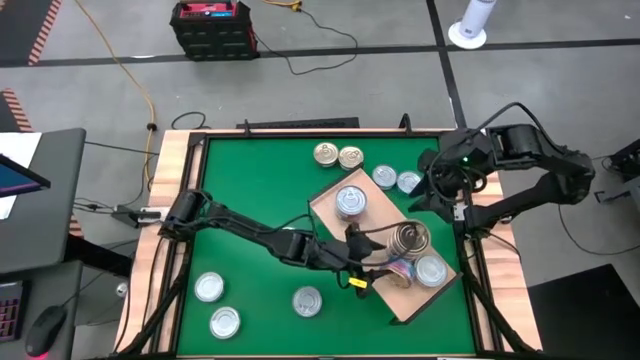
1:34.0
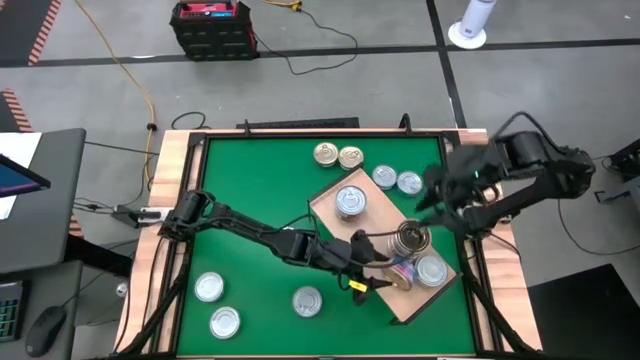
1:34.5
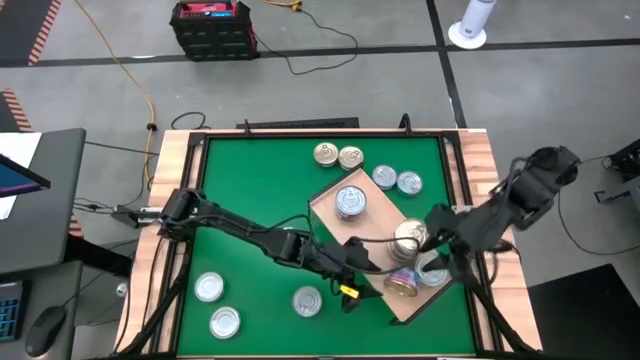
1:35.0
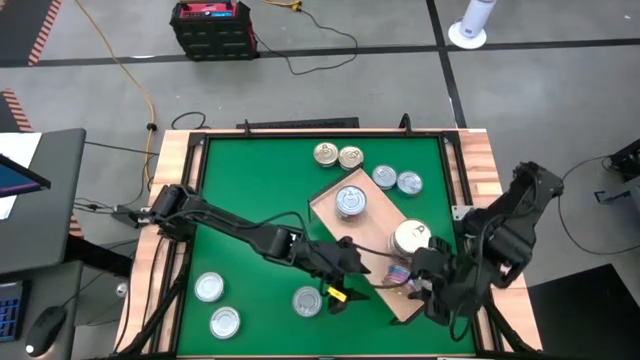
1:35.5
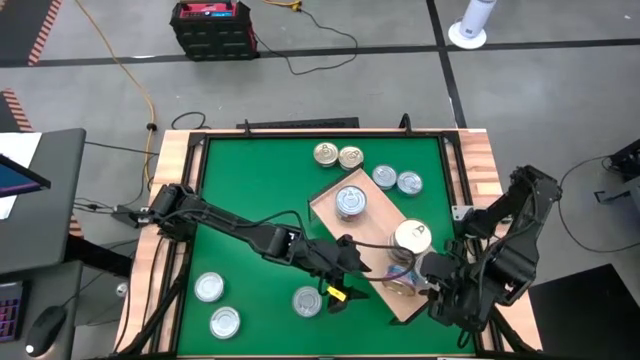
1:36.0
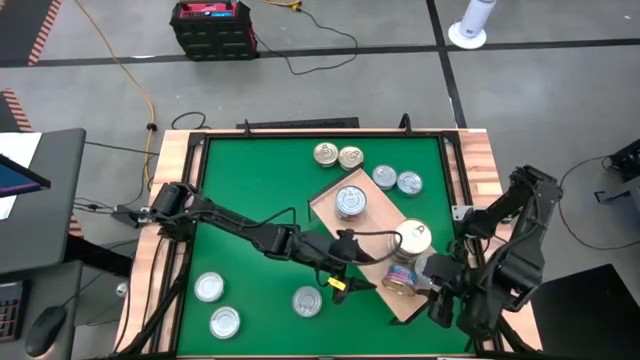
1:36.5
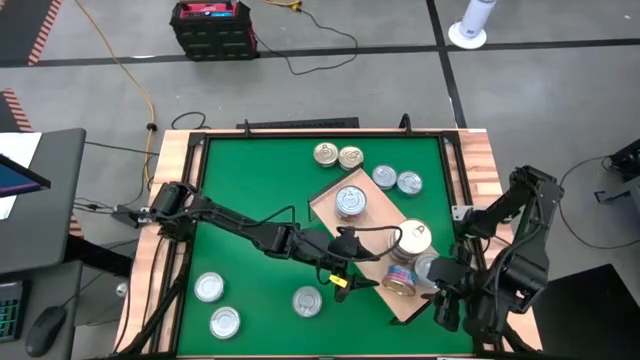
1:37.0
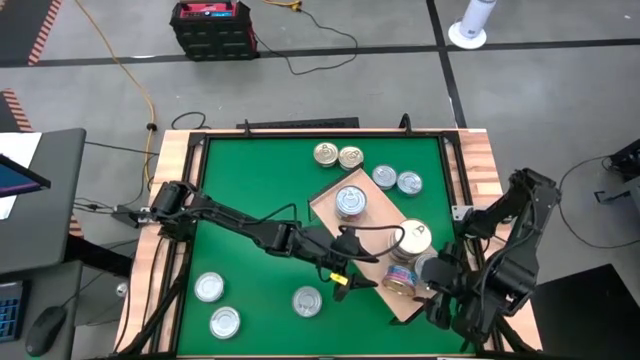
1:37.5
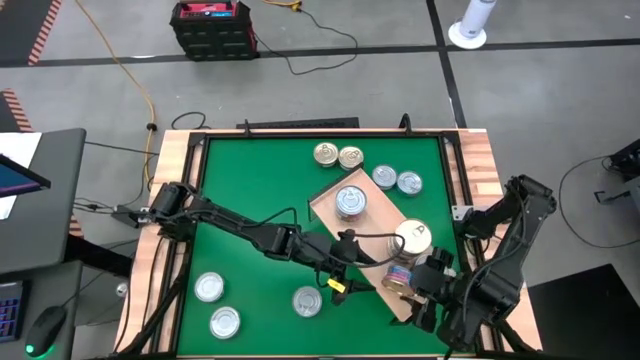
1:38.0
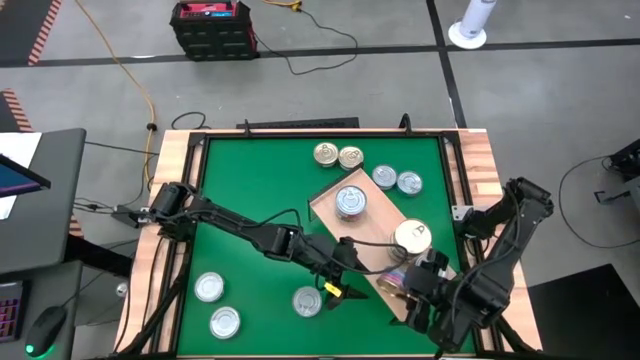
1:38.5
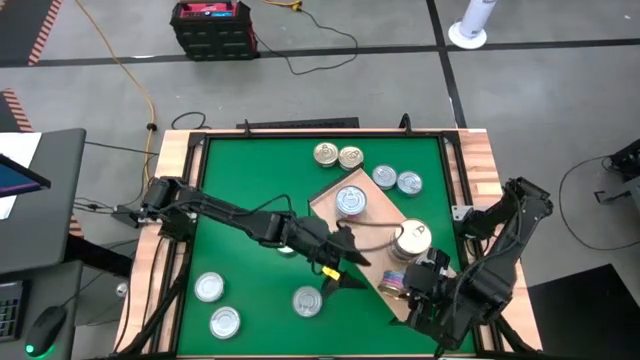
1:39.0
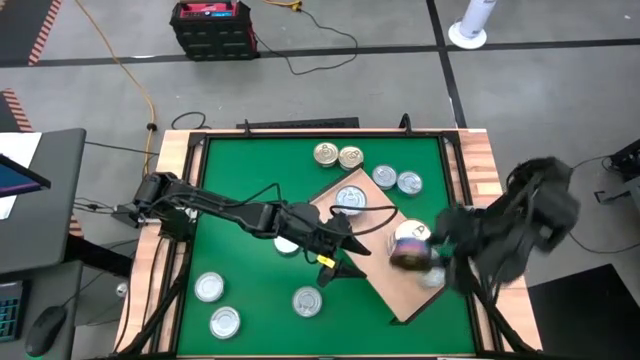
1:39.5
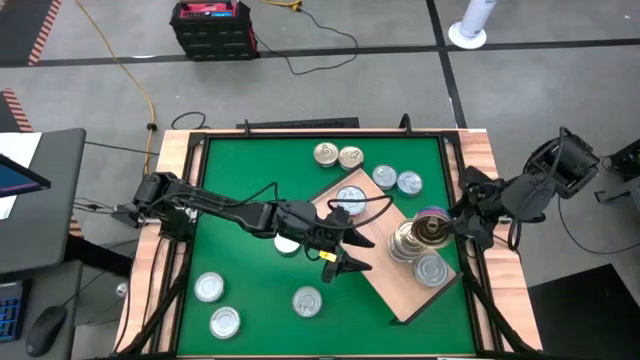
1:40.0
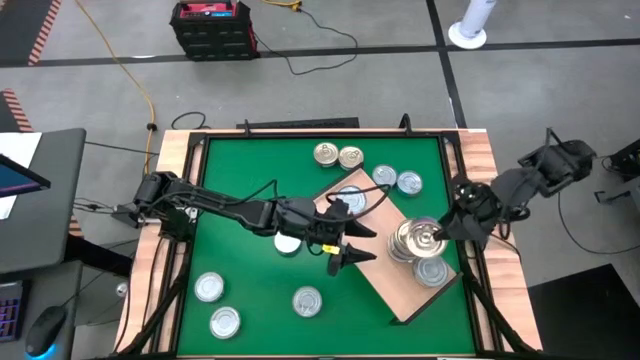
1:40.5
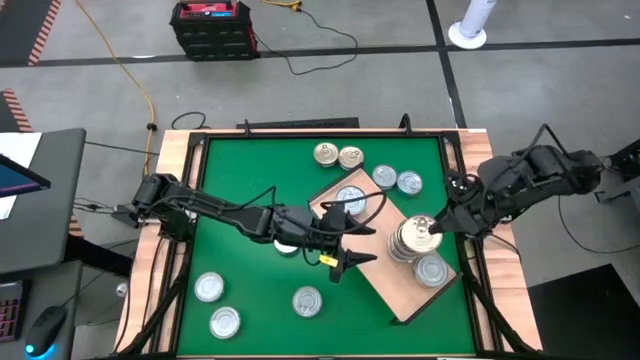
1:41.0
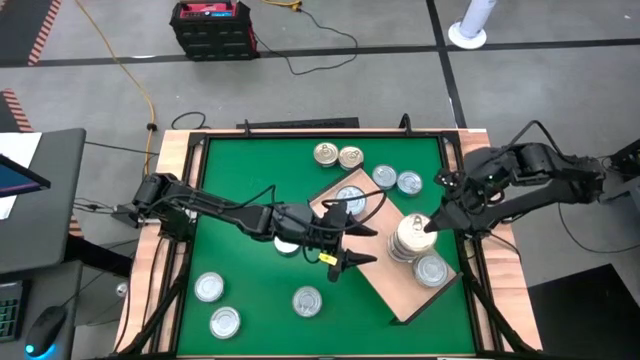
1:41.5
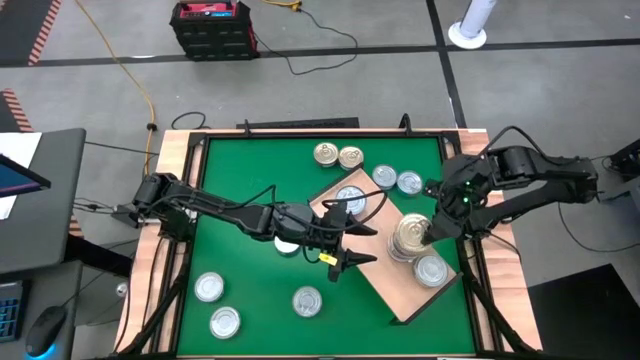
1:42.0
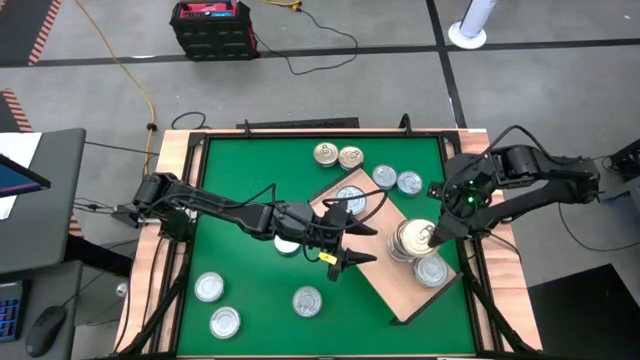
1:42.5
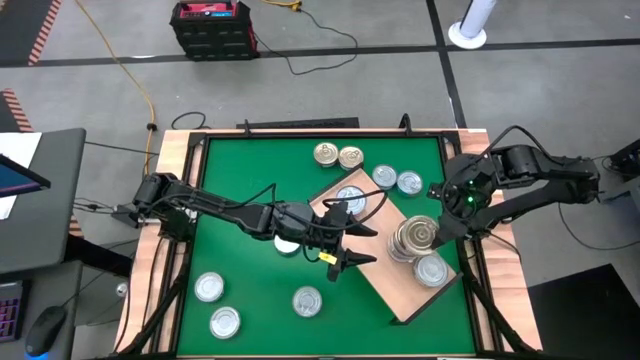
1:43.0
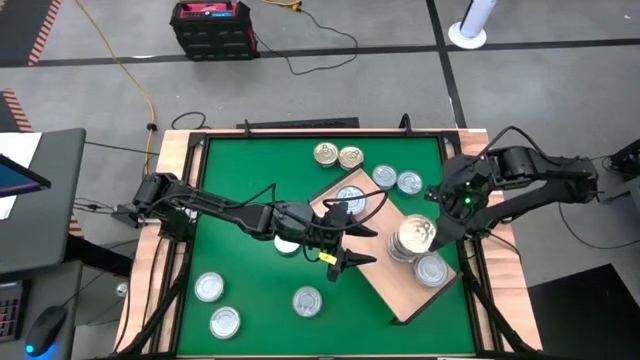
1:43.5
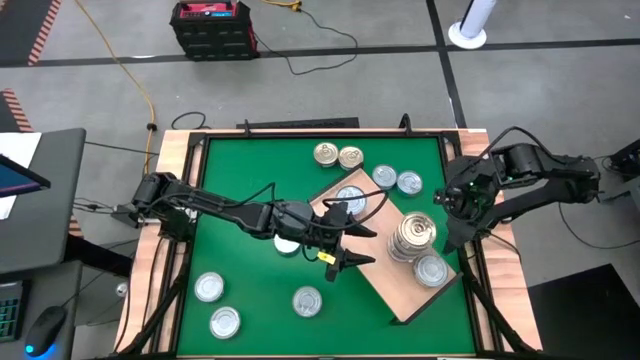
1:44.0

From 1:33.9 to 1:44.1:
Task: Stack canned seafood by type on shelf
Stack the blue and pink tuna can on top of the other blue and pink tuna cans on the shelf

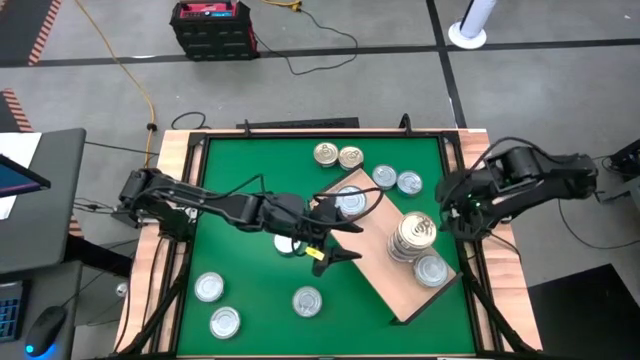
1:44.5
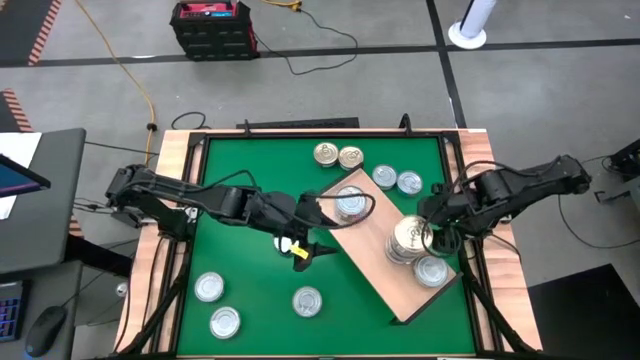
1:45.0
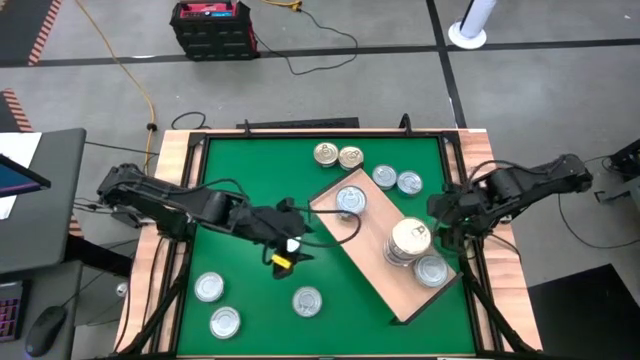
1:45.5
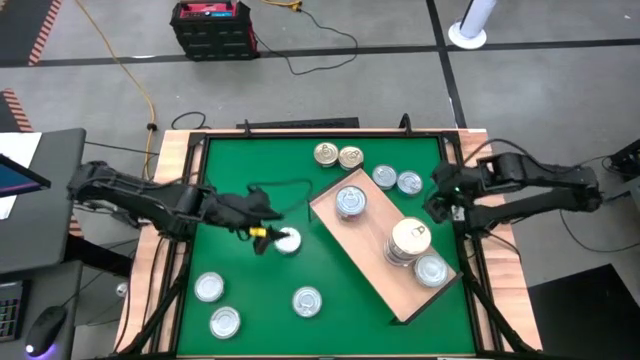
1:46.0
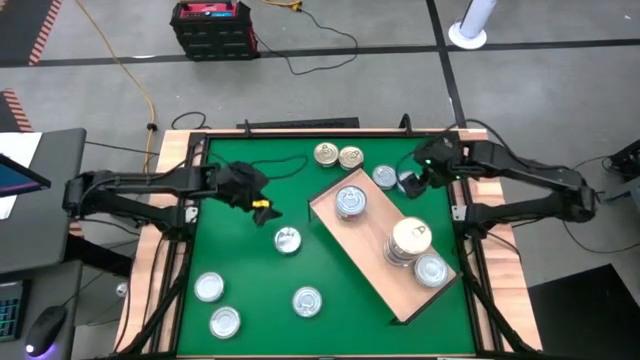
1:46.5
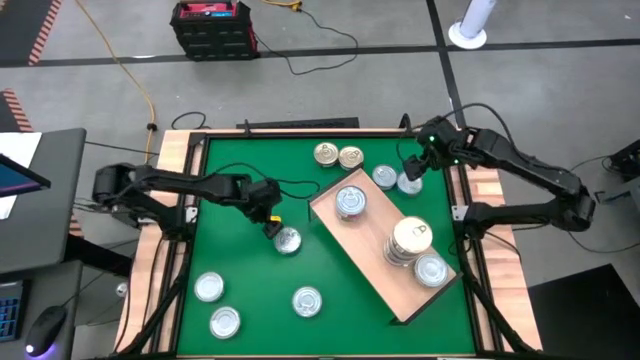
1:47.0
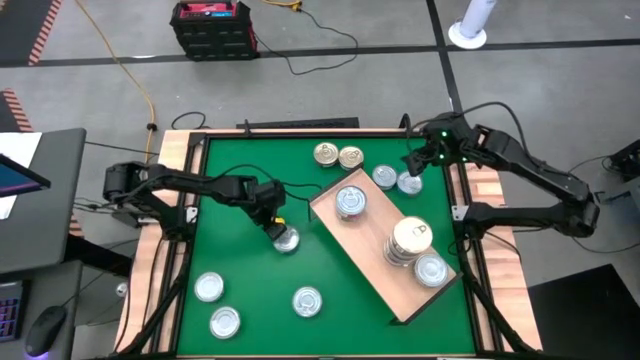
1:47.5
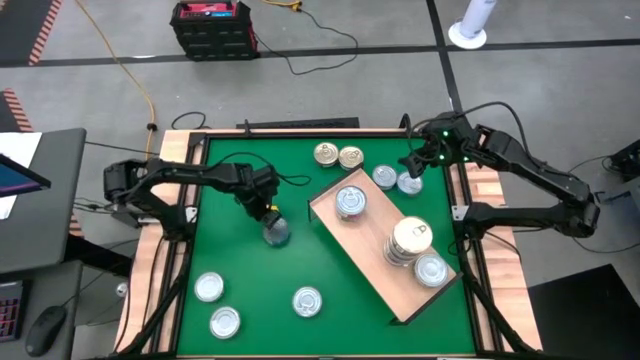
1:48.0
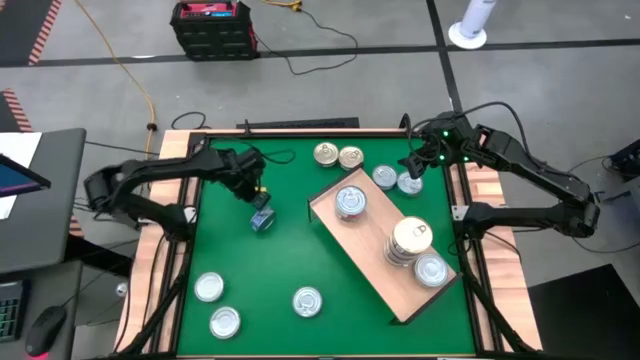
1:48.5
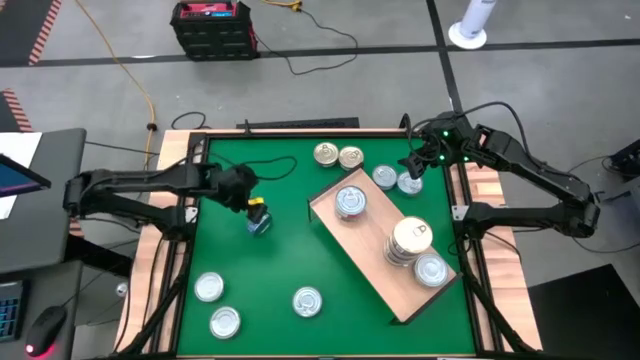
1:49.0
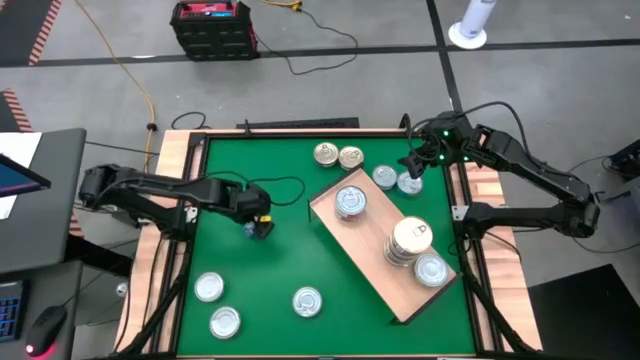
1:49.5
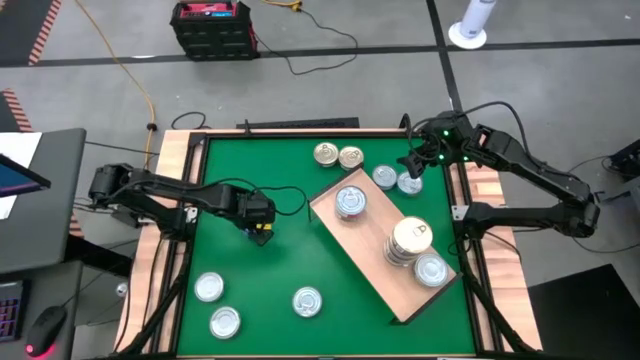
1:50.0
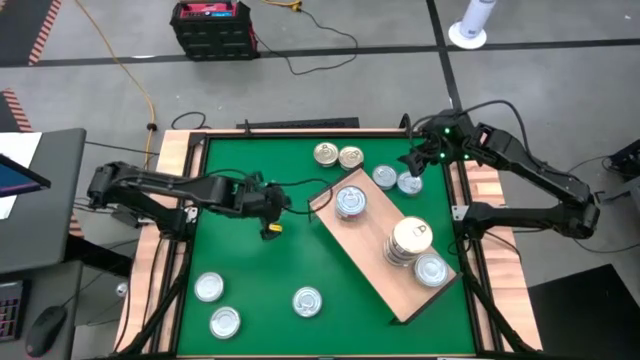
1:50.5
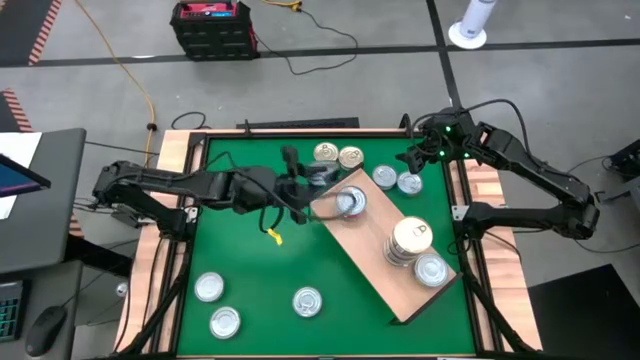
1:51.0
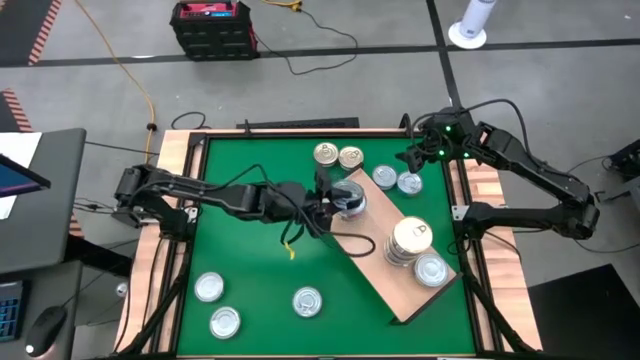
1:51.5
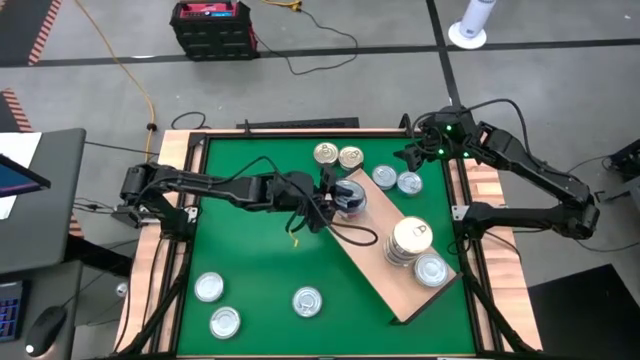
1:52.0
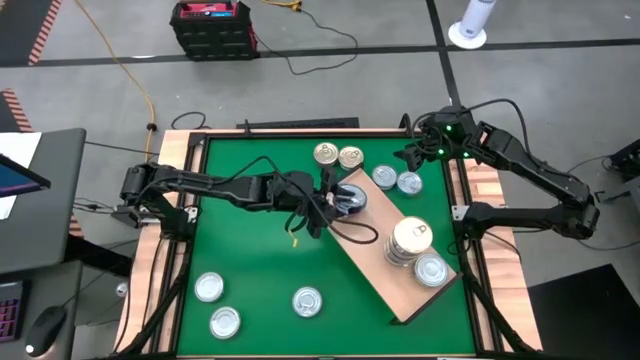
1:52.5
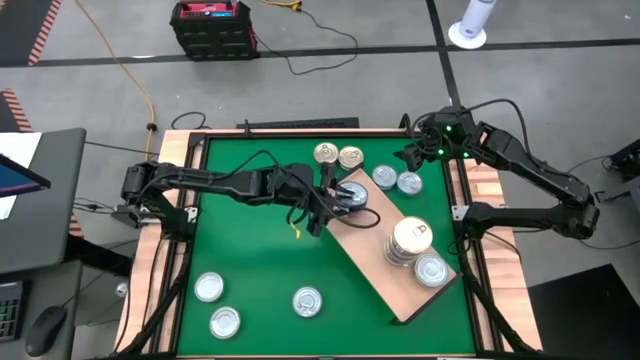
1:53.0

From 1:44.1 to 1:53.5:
Stack the blue tuna can on top of the red tuna can on the shelf

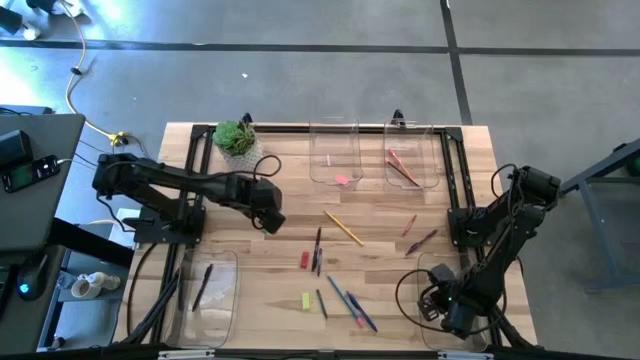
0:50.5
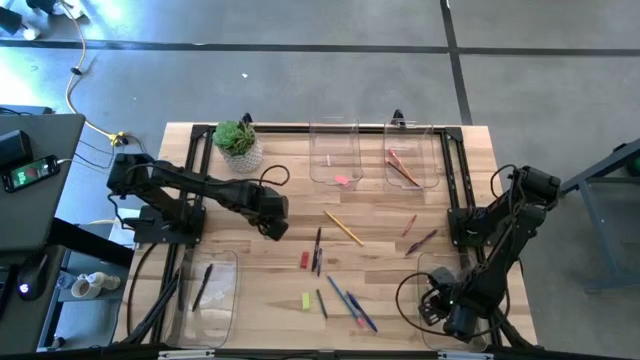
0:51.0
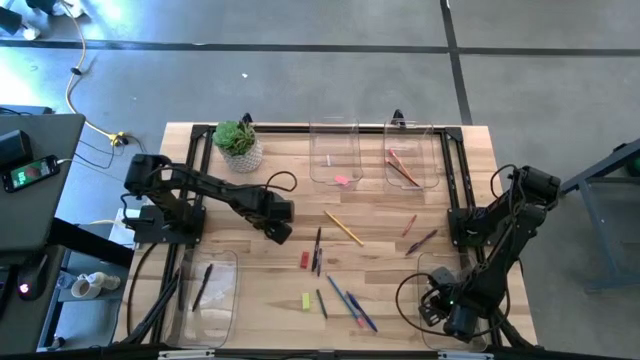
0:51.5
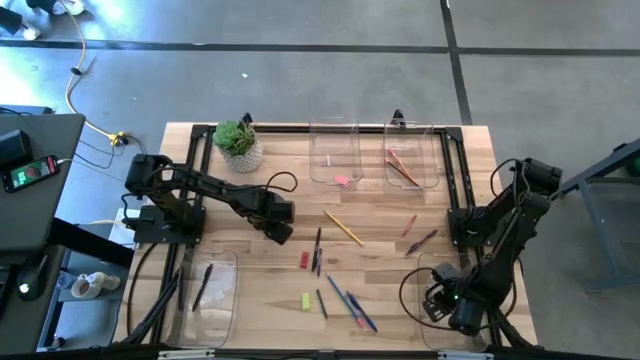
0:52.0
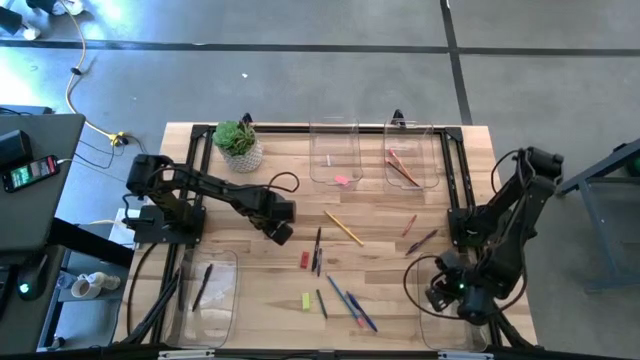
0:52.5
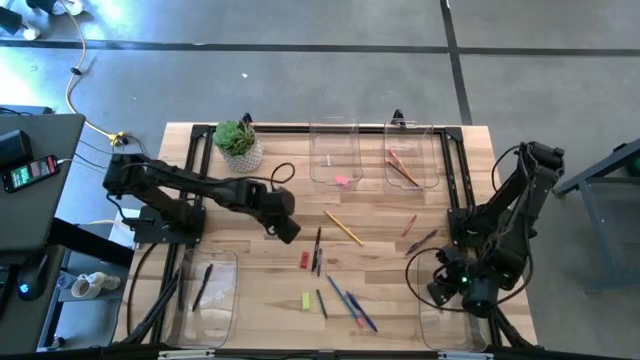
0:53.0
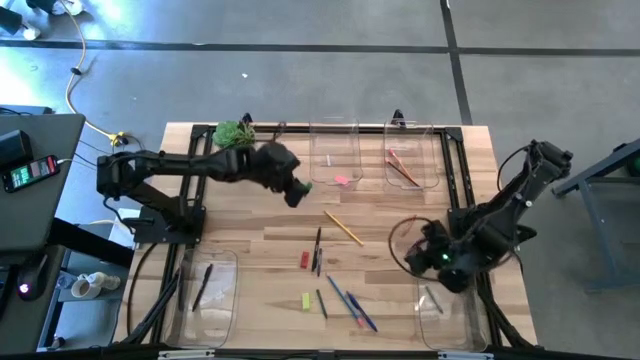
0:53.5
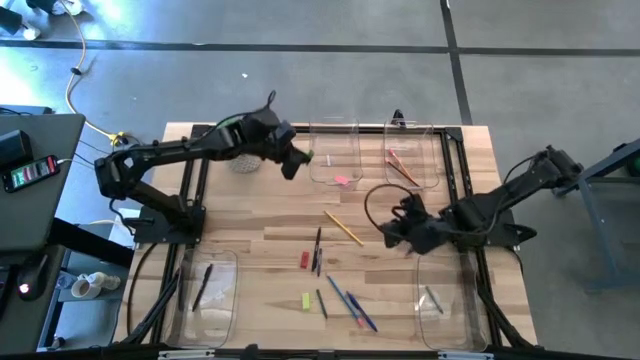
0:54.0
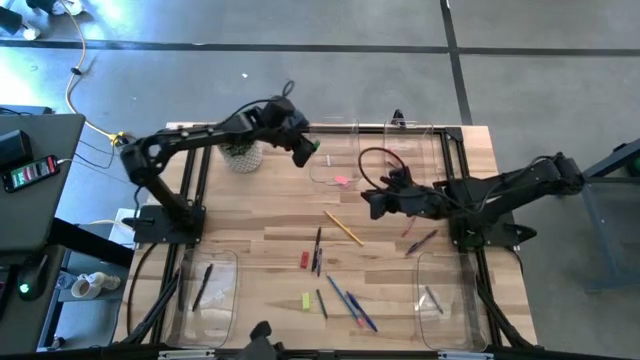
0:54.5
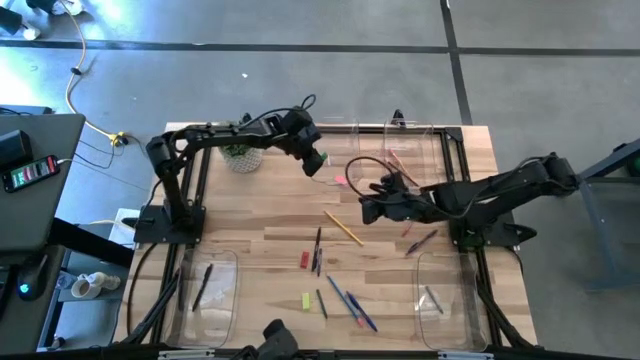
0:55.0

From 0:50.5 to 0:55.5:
Task: Sort crayons/erasers/pens/pencils in bins
Put the green eraser into the top right transparent bin
